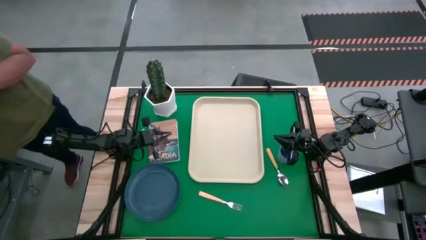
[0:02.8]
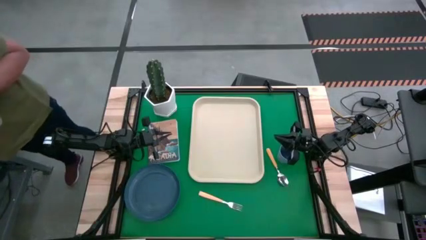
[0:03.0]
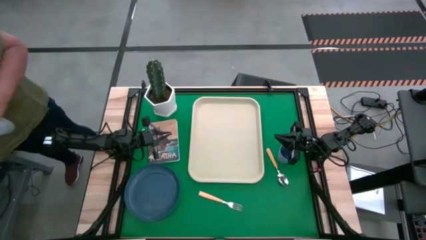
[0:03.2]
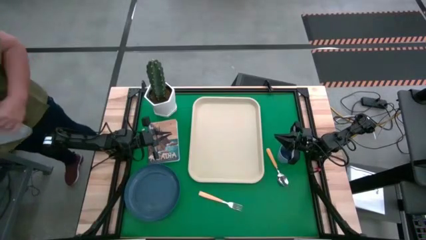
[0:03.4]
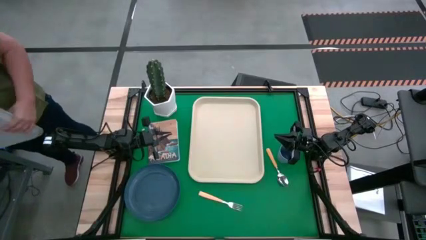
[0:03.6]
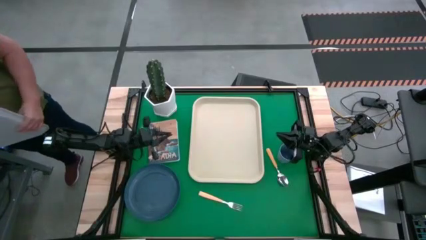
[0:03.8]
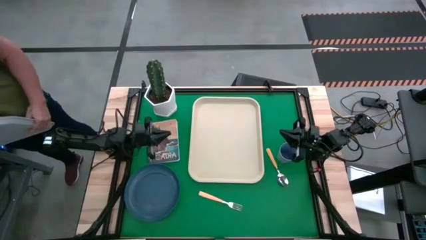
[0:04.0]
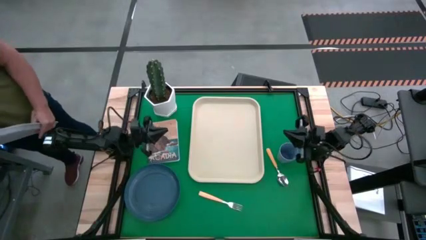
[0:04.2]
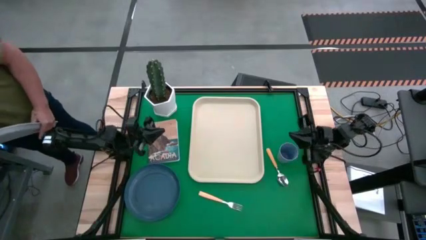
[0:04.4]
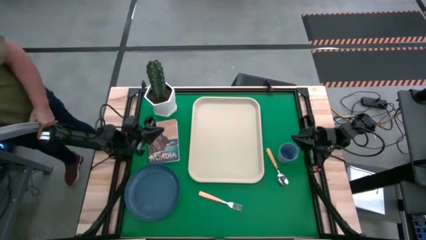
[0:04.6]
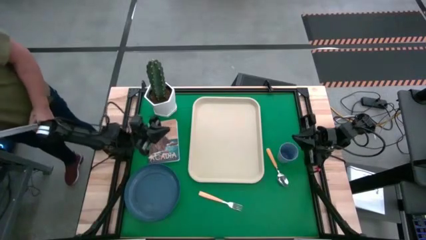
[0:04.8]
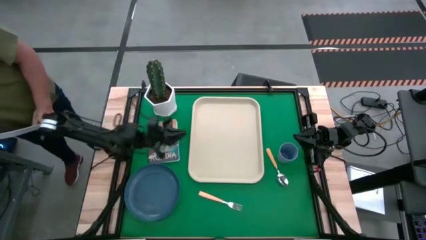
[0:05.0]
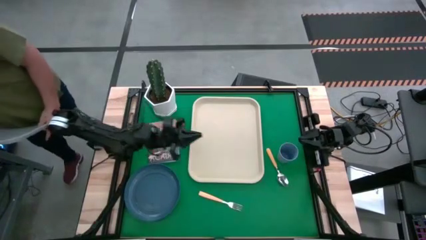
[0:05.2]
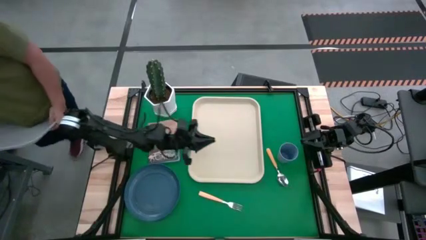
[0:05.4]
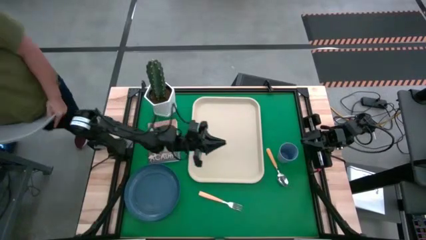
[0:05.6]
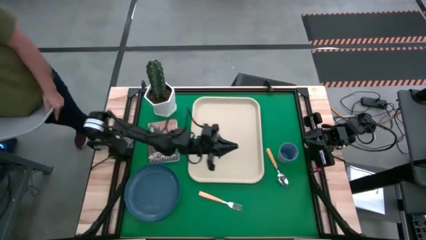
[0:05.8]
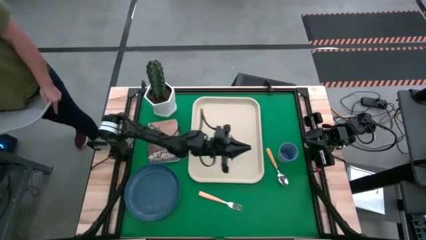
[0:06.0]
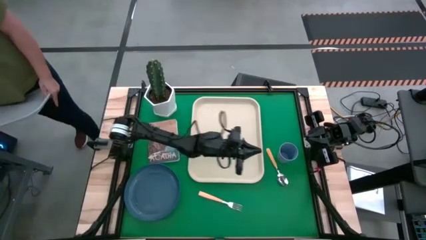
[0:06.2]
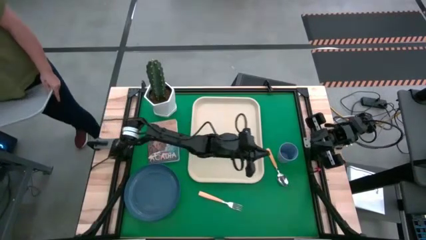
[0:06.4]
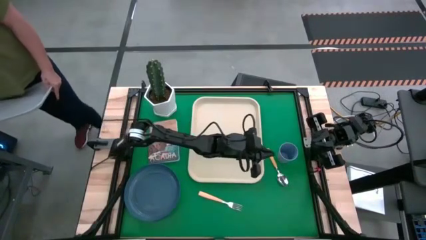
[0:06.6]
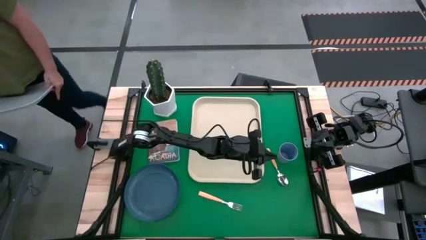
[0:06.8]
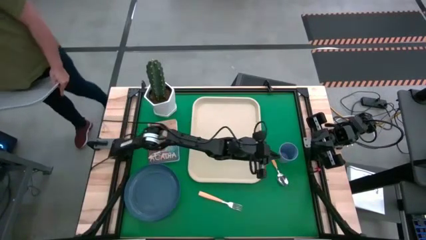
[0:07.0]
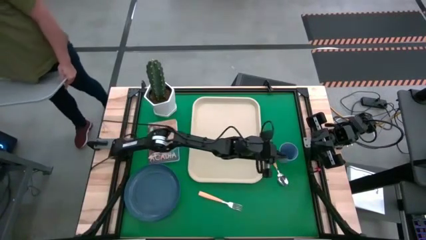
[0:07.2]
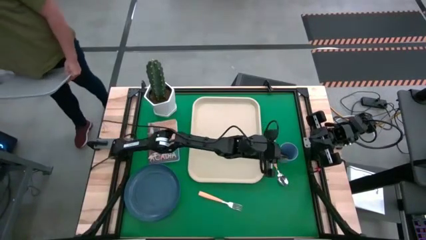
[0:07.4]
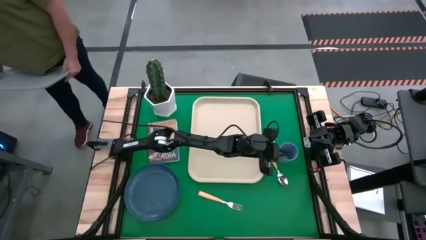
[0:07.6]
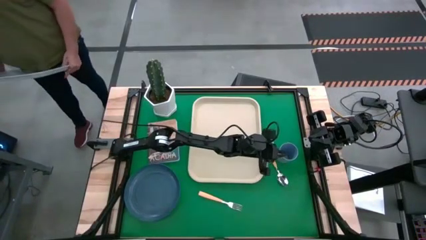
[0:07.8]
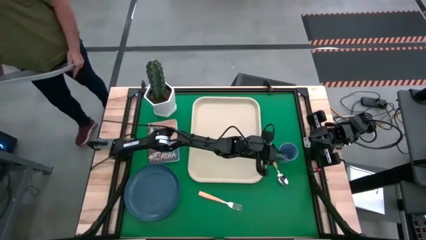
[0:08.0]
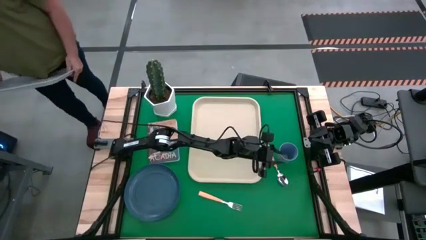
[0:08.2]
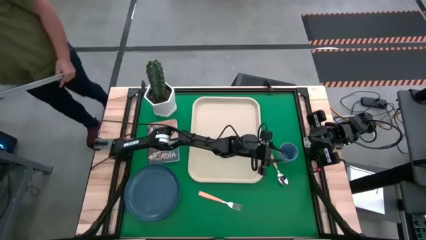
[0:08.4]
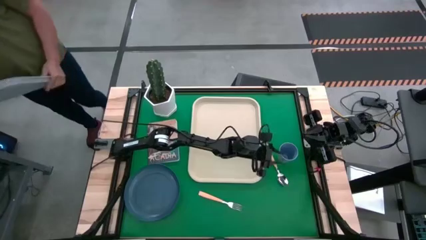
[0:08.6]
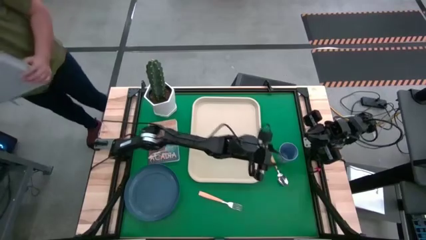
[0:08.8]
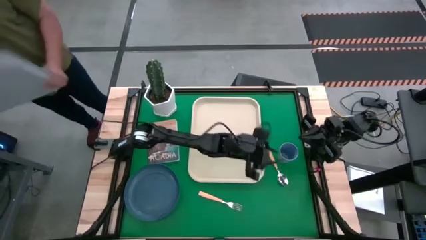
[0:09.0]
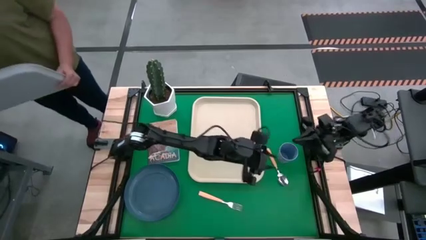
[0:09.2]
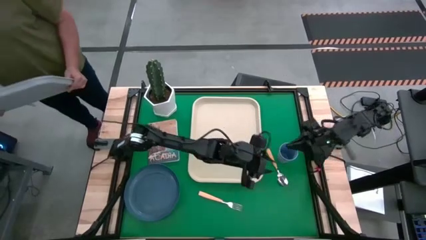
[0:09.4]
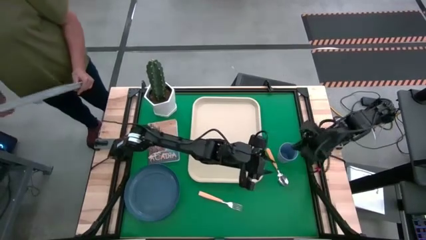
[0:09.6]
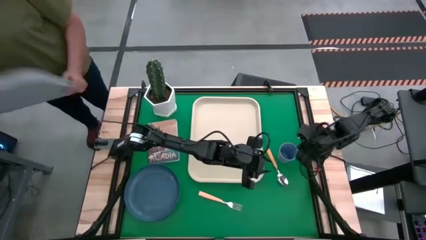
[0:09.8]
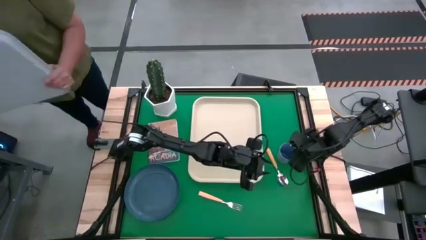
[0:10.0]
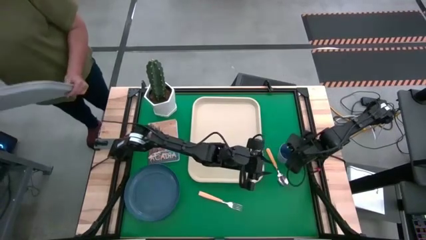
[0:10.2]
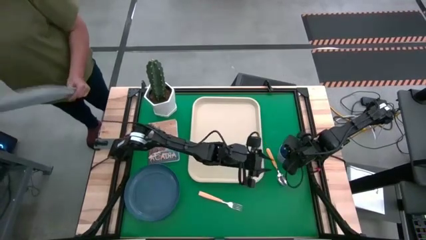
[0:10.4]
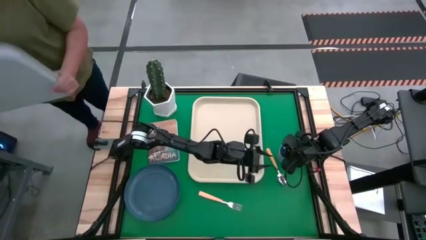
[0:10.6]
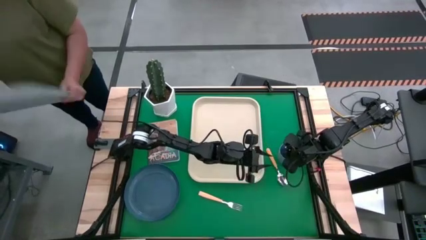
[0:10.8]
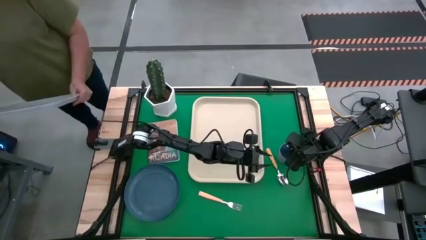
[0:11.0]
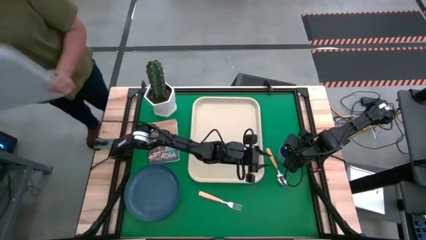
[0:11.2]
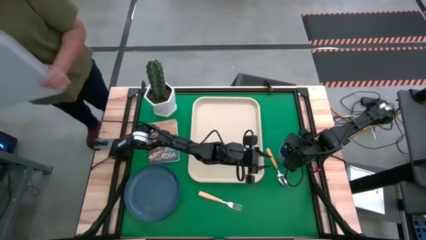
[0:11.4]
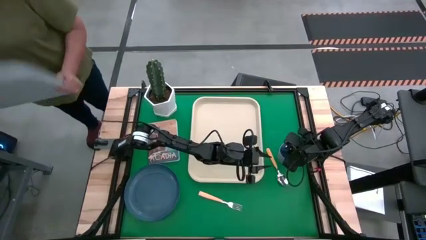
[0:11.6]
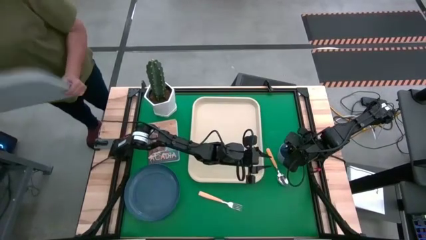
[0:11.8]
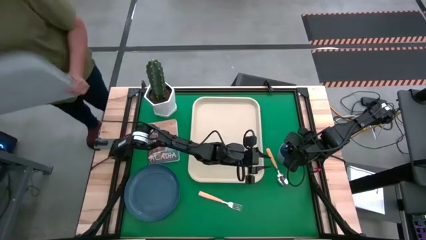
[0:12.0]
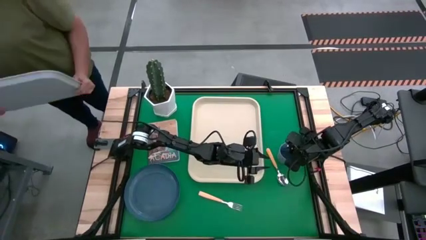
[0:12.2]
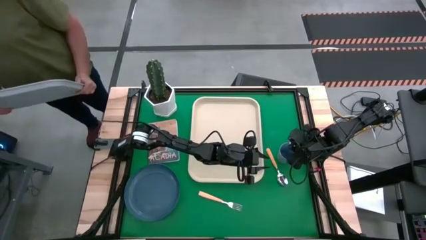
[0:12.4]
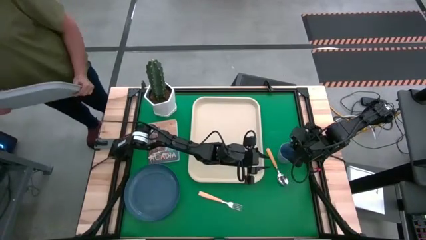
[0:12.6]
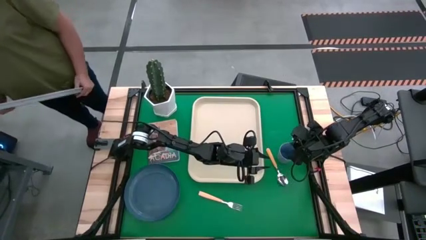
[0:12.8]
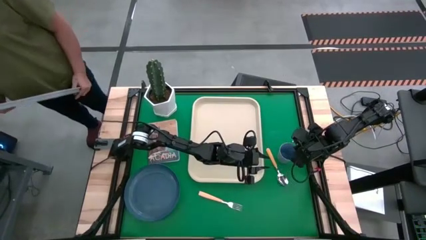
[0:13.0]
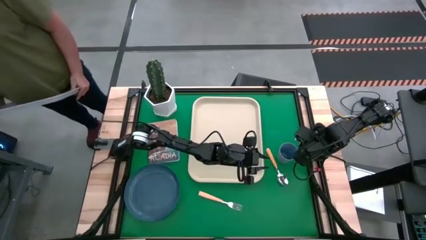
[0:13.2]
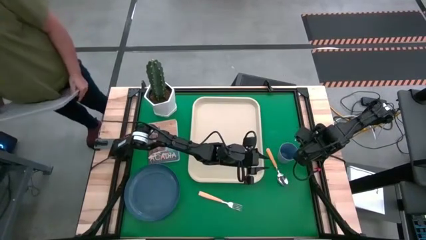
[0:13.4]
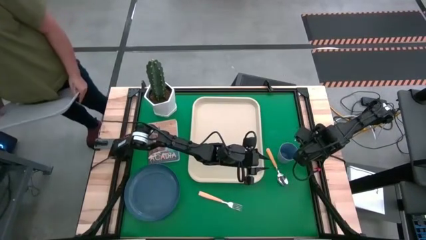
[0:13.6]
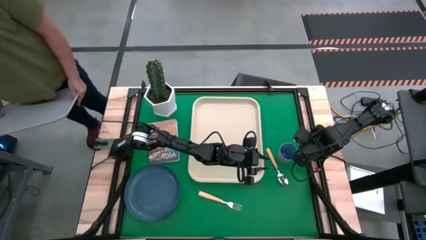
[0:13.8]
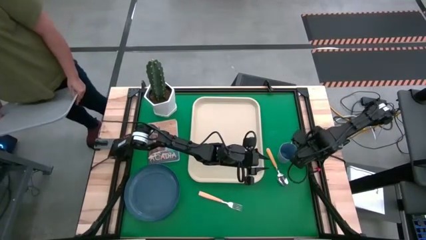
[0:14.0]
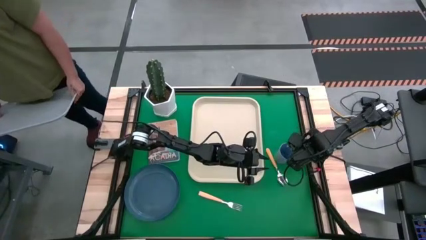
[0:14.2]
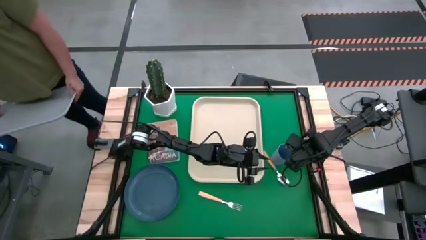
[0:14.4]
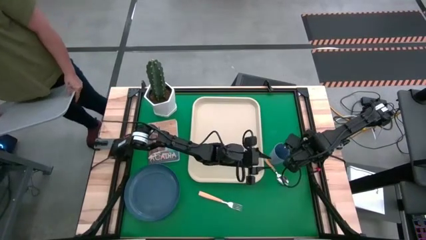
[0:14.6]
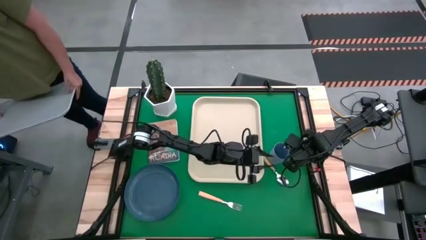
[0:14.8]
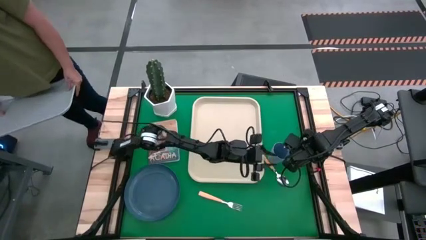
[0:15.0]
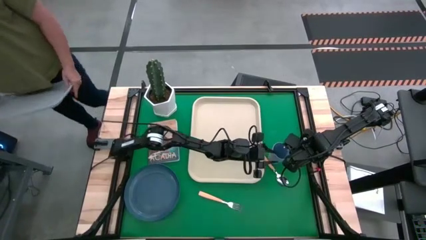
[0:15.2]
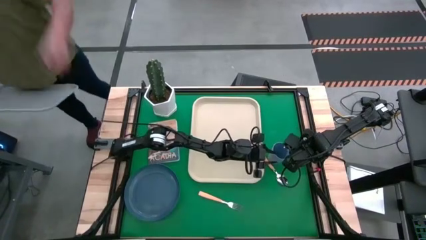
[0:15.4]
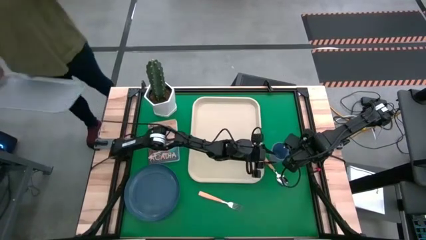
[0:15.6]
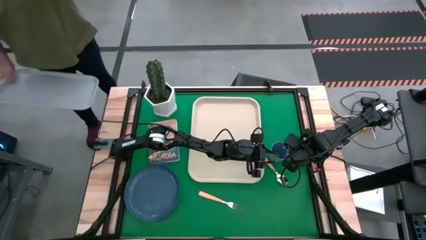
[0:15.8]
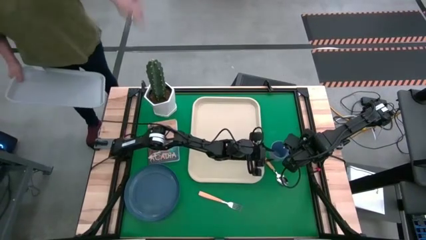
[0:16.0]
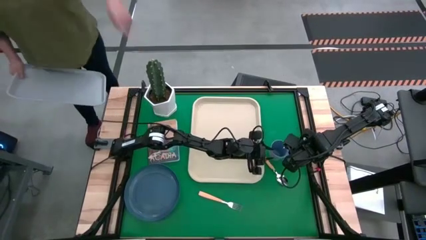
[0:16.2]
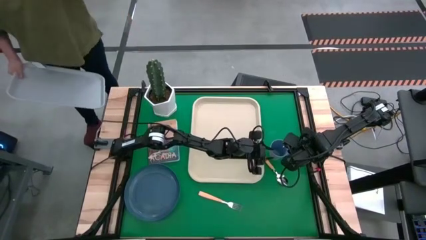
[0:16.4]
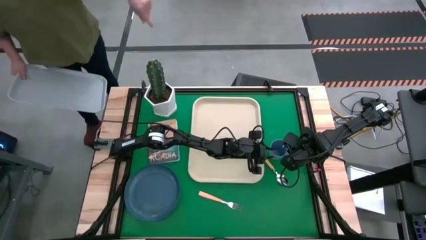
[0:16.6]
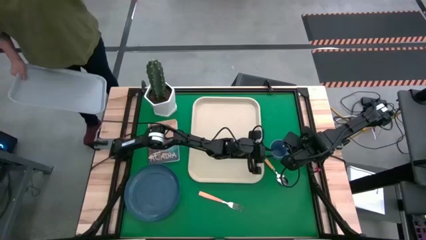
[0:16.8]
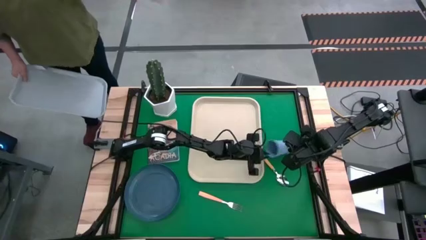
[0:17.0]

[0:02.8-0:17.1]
Task: Pick and place plate/cup/fork/spoon on tray
Put the blue cup on the white tray
